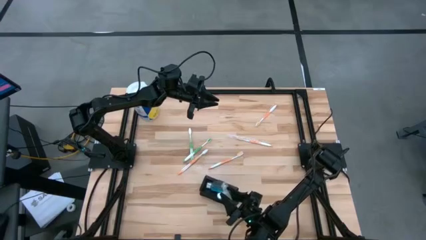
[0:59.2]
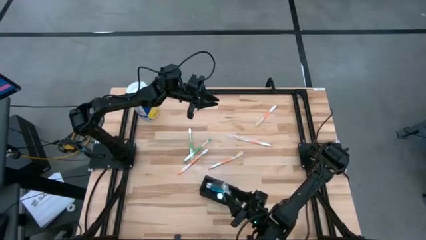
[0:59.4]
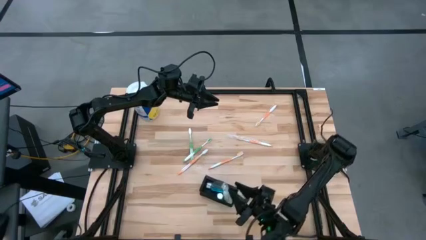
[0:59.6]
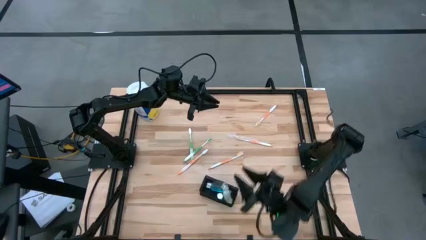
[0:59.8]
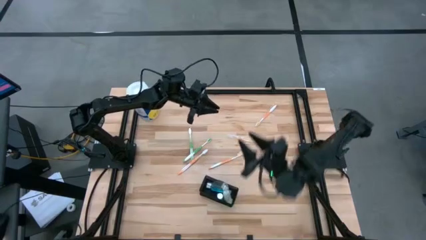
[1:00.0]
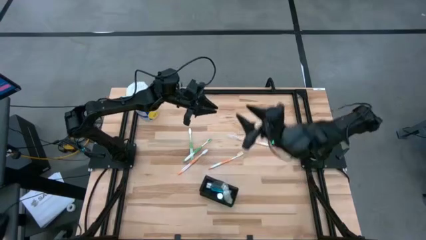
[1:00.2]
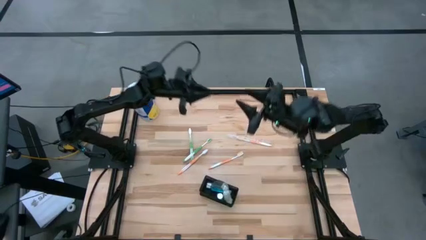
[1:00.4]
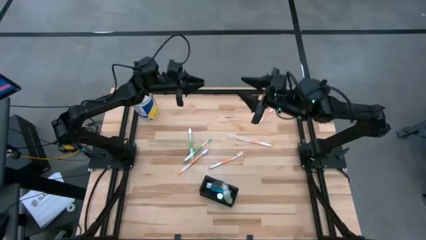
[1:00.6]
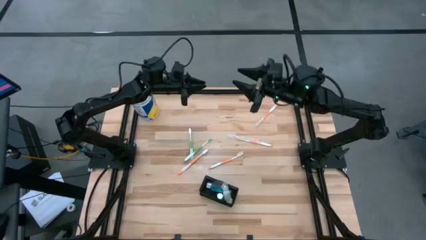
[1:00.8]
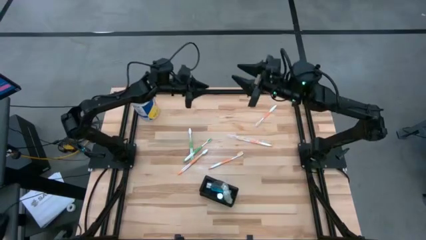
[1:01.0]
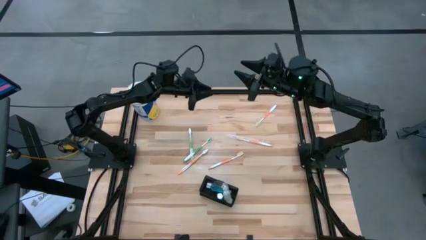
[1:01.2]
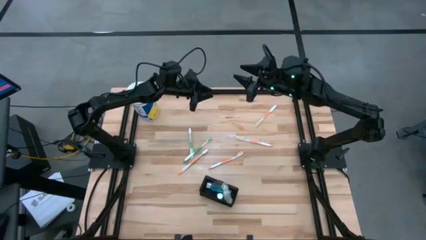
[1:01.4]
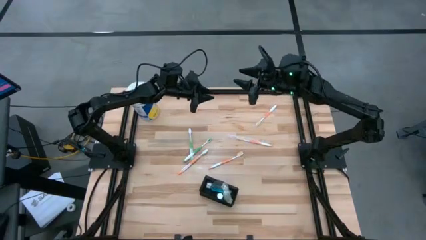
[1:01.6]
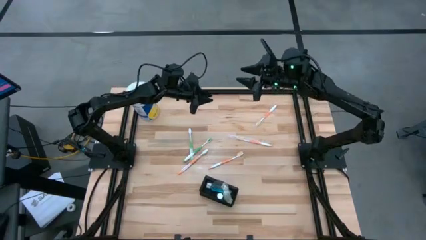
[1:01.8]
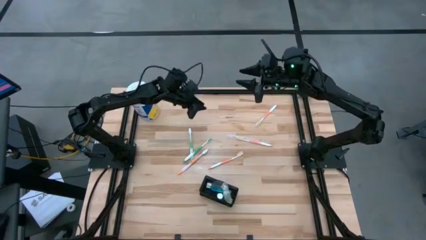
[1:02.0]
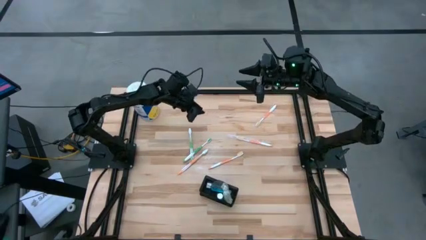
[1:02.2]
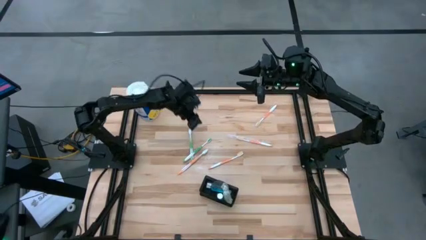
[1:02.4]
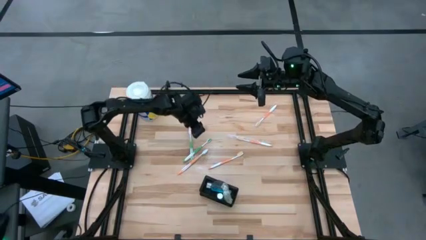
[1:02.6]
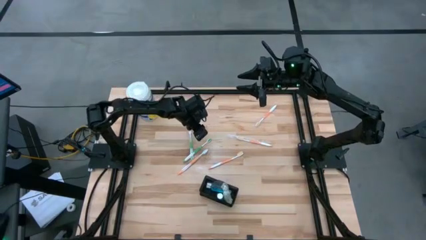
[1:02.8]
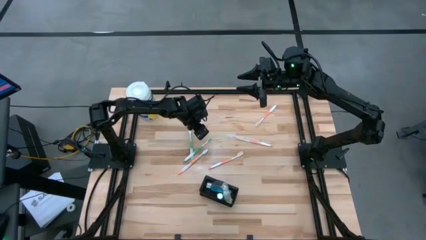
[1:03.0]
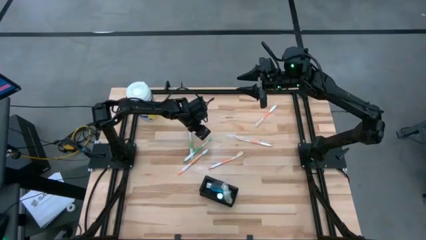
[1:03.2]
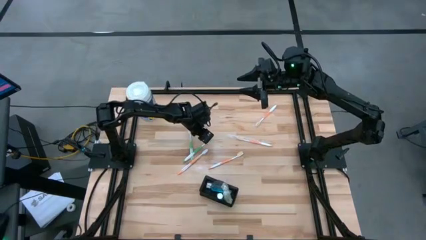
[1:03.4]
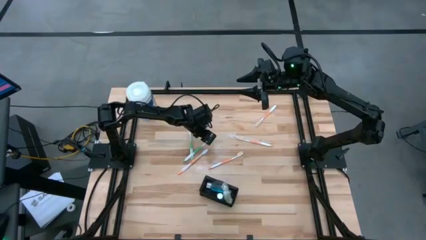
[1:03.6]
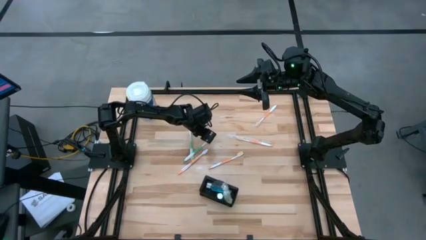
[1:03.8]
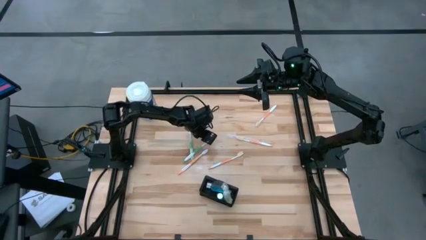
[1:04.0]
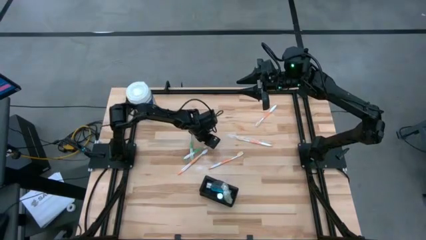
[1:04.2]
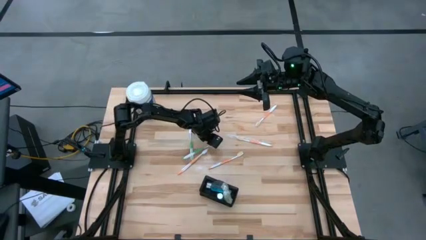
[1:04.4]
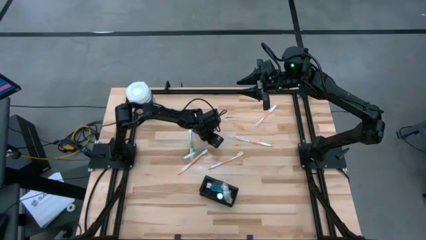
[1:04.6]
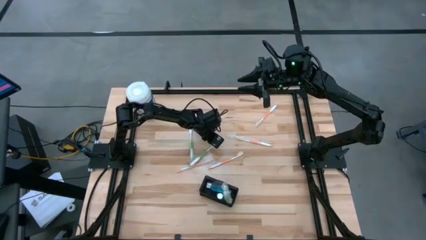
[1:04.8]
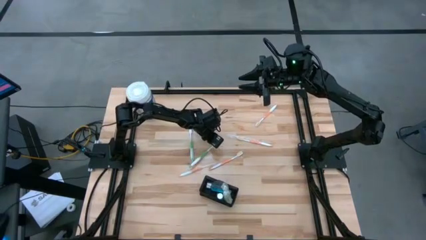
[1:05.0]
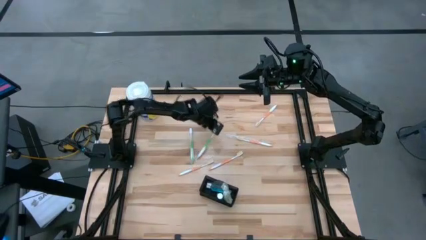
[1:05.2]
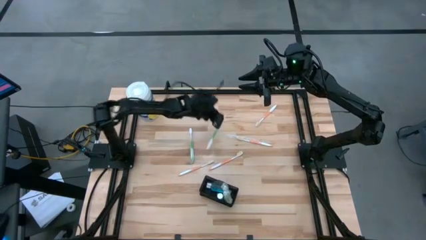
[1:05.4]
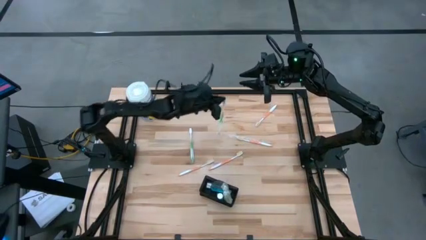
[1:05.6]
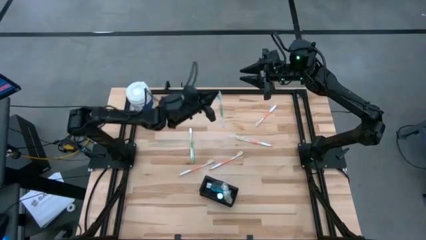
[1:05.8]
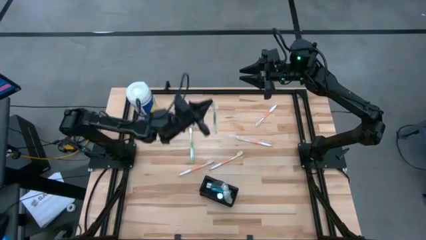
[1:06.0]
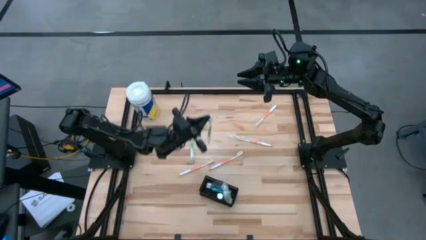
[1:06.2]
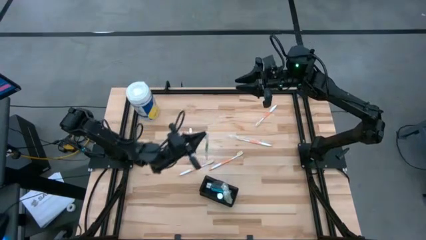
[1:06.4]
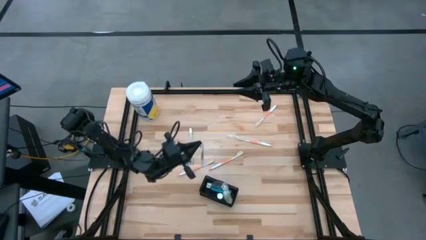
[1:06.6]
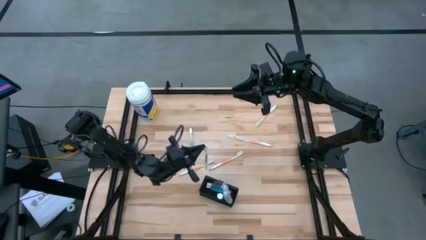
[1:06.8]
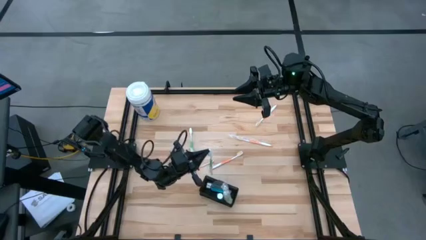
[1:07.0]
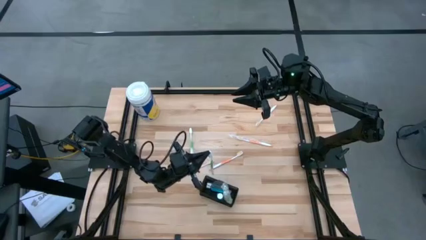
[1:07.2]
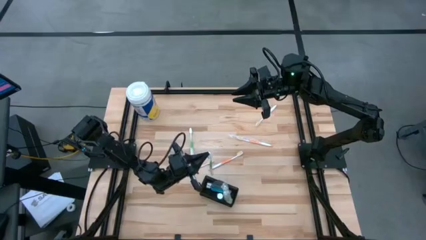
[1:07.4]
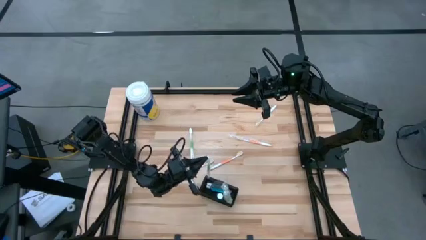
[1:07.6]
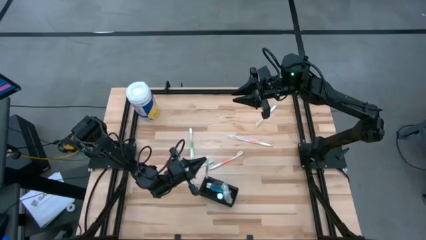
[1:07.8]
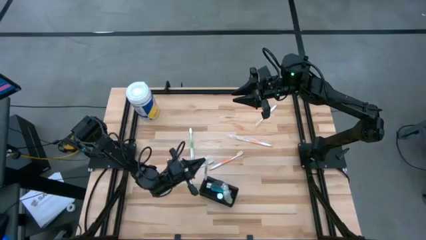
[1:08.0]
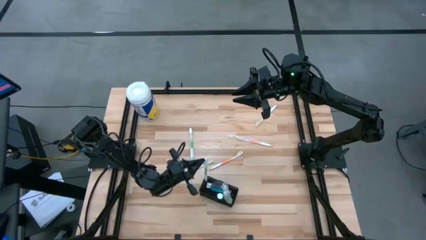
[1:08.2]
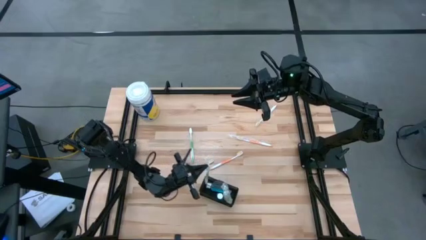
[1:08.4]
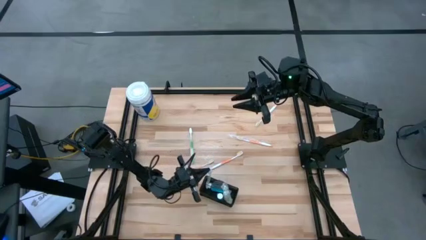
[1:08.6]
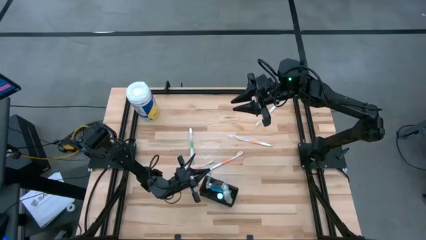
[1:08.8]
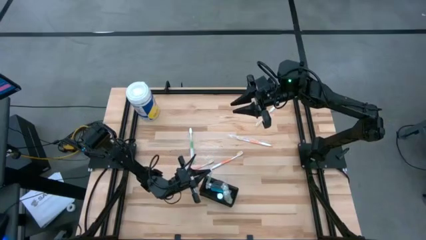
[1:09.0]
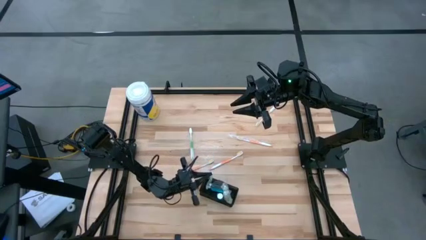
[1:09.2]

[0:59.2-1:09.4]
Task: Pick & Place toothbrushing station
Put the green toothbrush into the black wire organizer

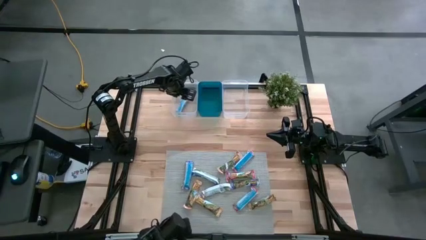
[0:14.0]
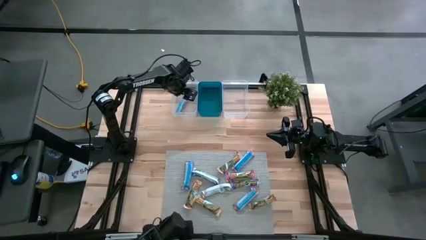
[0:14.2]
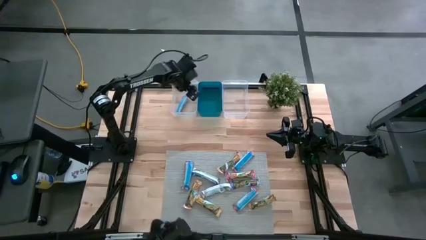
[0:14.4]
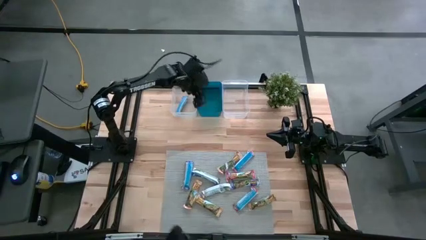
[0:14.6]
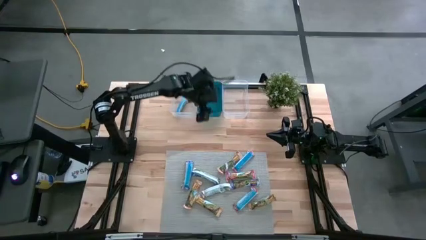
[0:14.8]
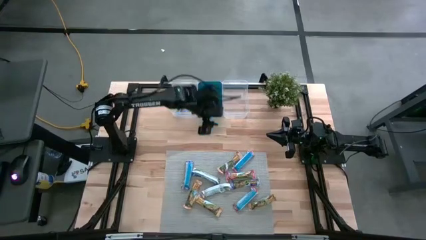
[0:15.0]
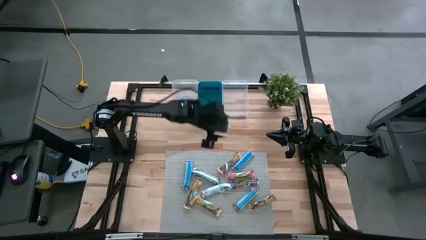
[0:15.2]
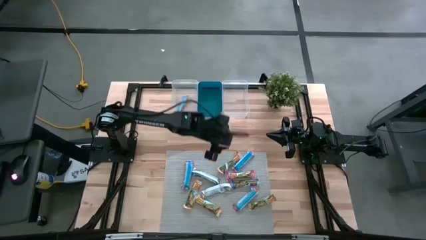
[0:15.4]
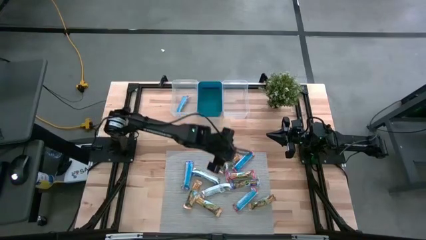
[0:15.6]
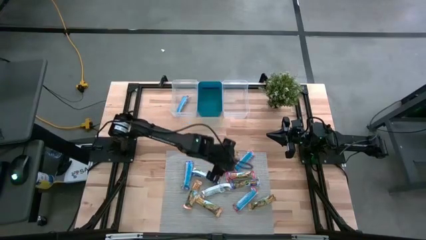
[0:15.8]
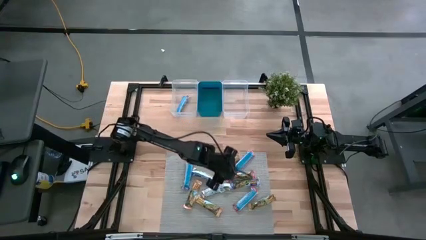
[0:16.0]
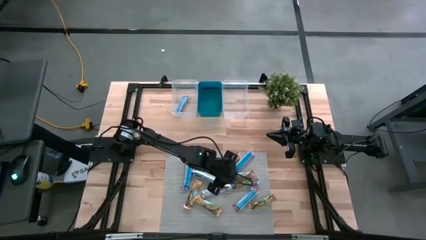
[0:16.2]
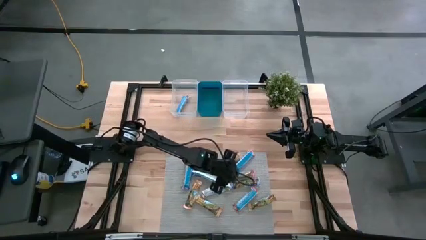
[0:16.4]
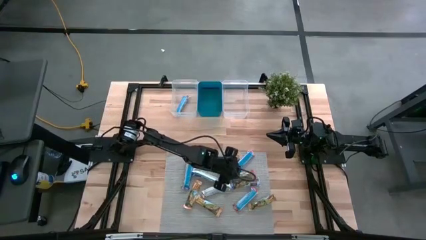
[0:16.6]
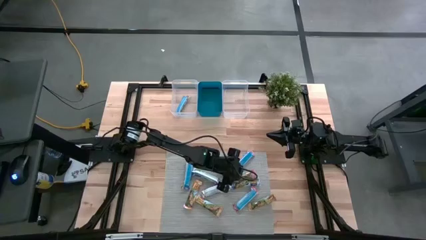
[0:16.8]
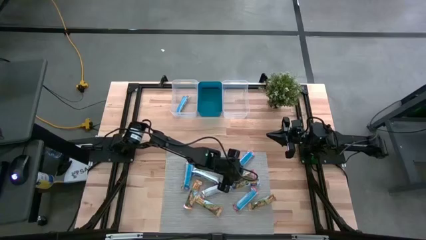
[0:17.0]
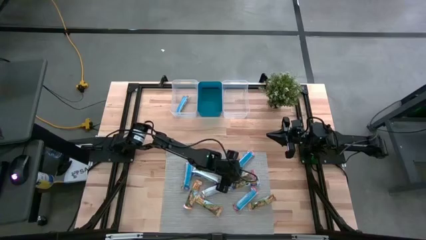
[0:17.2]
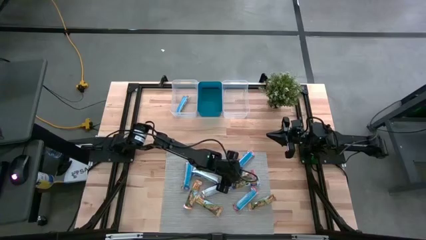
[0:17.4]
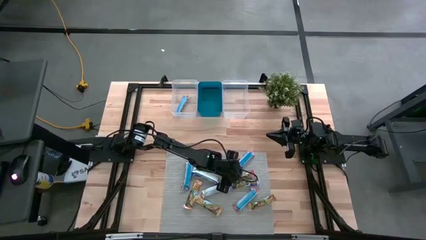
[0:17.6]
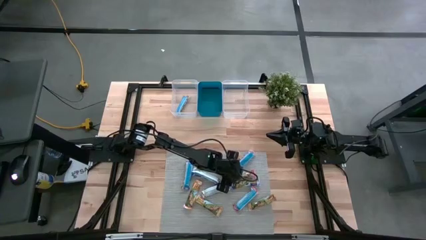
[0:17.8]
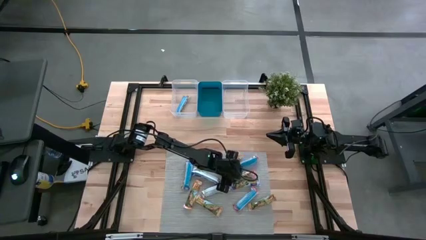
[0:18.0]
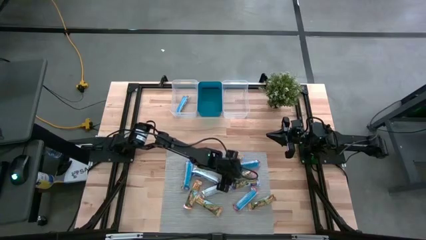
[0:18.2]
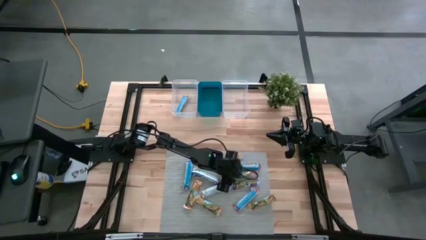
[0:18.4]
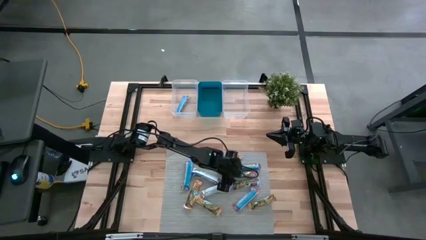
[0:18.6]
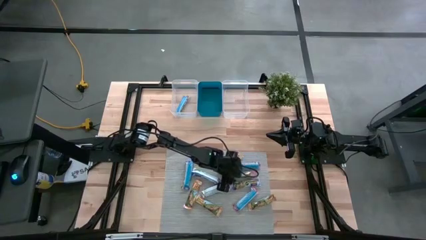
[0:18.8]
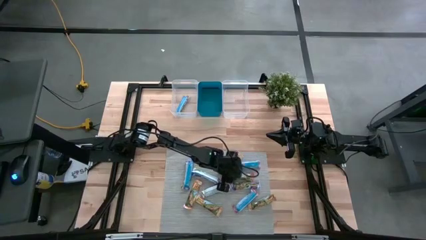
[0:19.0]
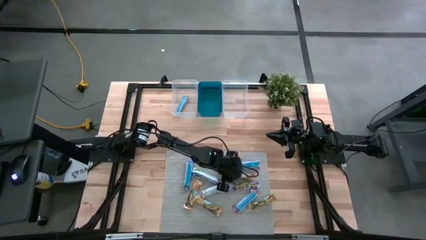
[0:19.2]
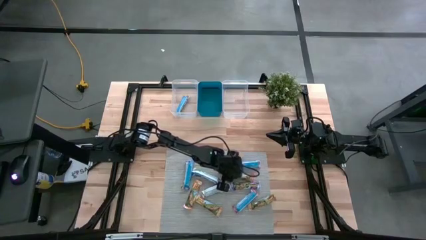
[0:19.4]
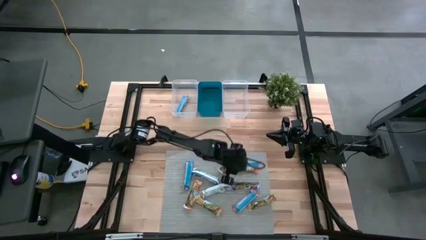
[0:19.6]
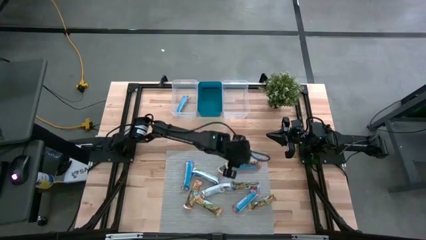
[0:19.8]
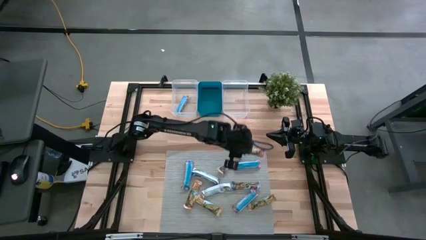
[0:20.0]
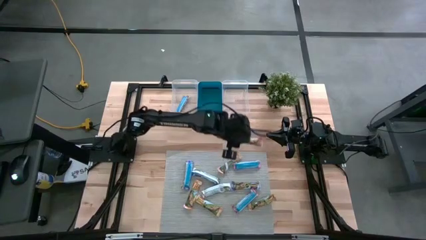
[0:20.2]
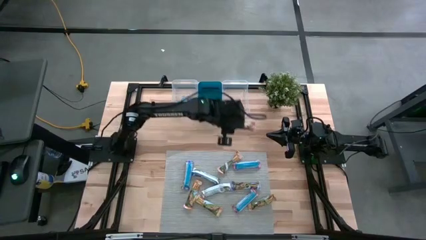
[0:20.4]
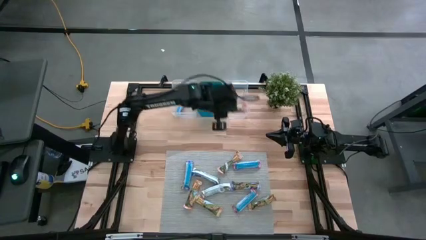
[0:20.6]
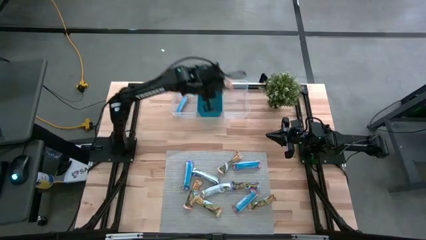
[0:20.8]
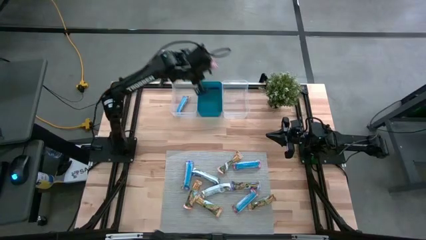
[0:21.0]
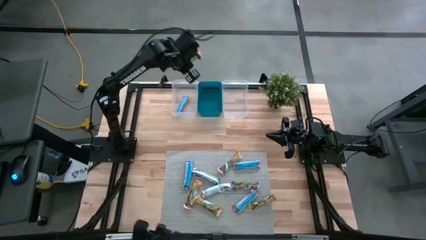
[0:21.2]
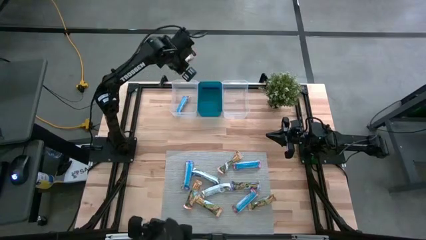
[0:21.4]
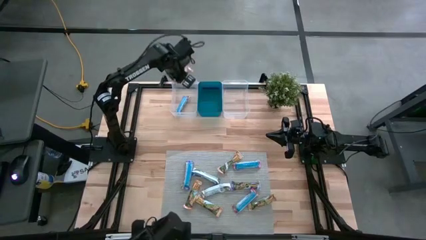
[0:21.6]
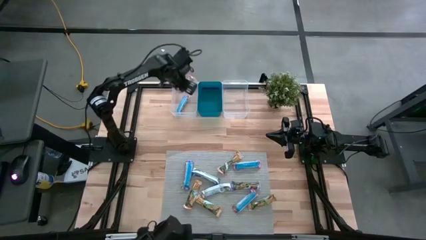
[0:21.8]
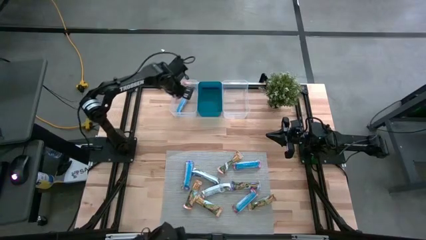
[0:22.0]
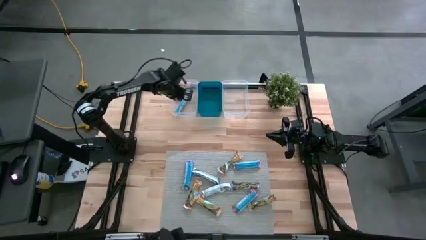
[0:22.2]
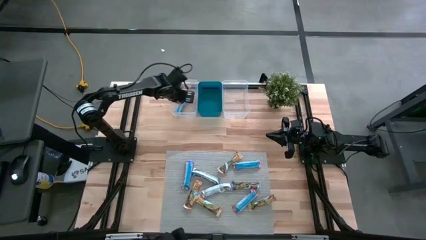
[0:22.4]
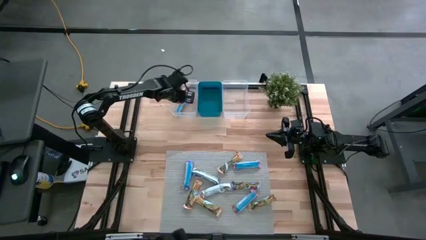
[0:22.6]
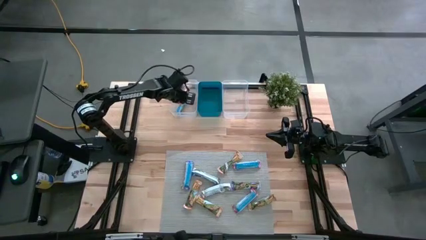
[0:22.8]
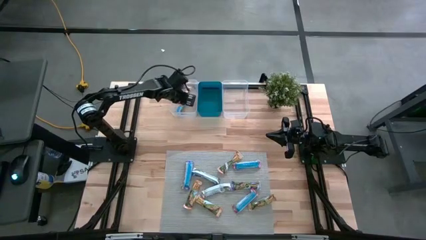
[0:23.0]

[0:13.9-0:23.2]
Task: Pick and place Granola Bars by type
Put the red granola bar into the left transparent bin
